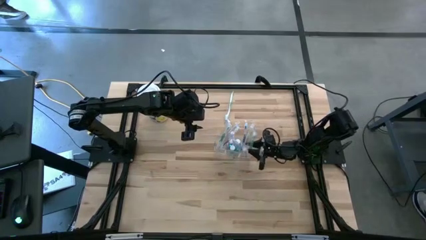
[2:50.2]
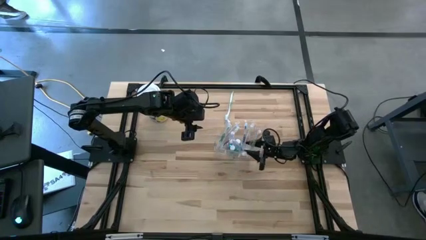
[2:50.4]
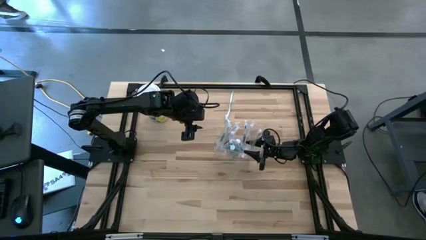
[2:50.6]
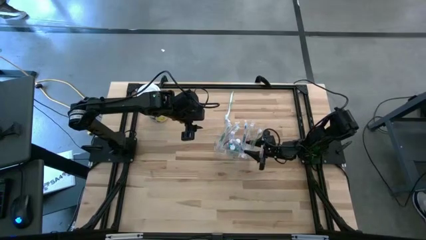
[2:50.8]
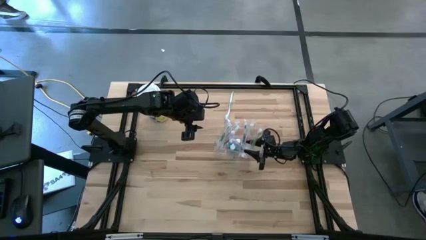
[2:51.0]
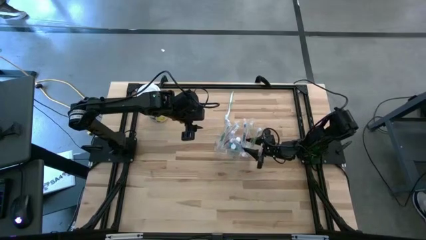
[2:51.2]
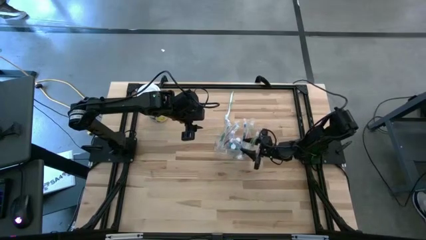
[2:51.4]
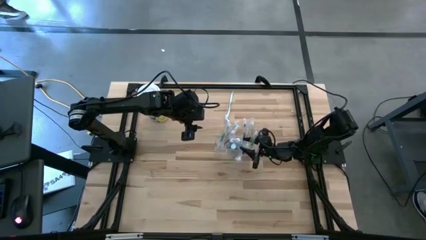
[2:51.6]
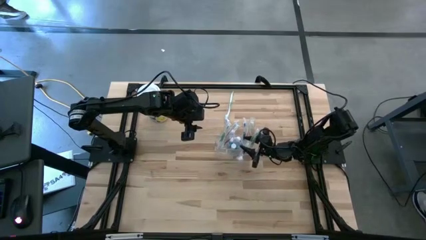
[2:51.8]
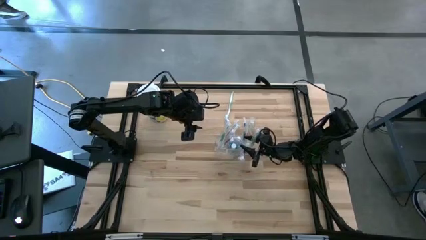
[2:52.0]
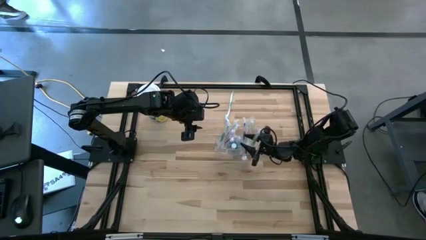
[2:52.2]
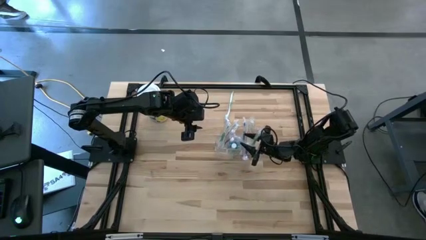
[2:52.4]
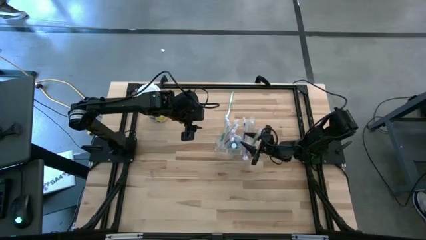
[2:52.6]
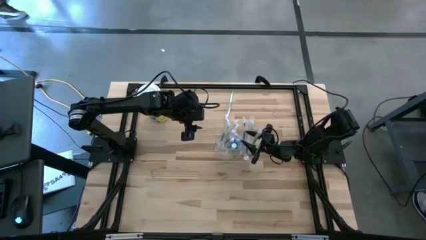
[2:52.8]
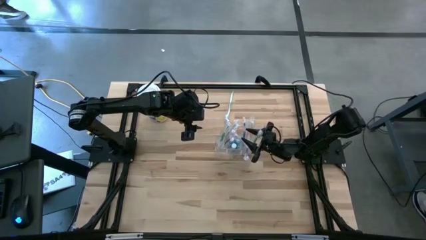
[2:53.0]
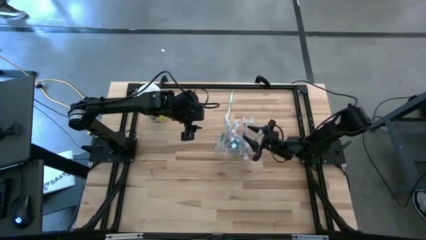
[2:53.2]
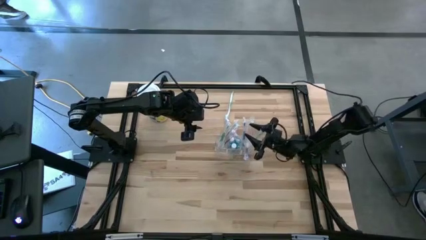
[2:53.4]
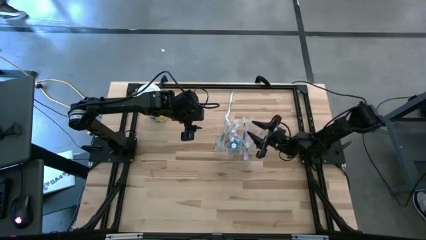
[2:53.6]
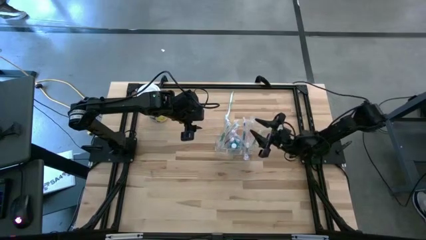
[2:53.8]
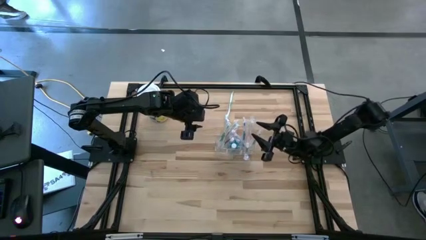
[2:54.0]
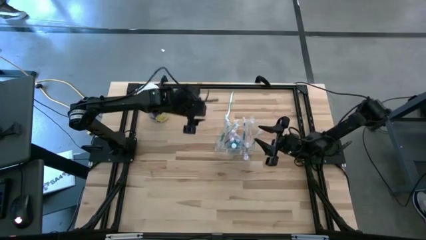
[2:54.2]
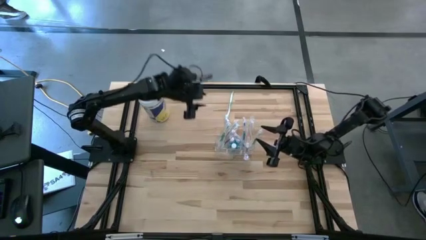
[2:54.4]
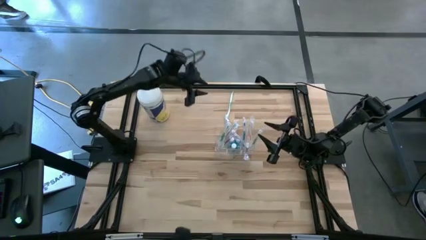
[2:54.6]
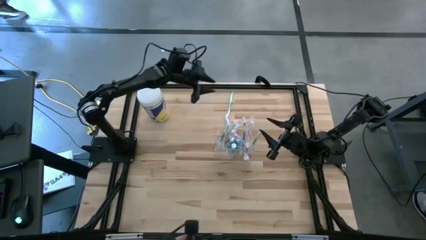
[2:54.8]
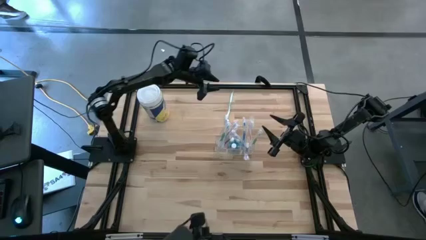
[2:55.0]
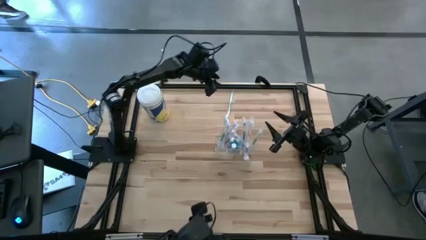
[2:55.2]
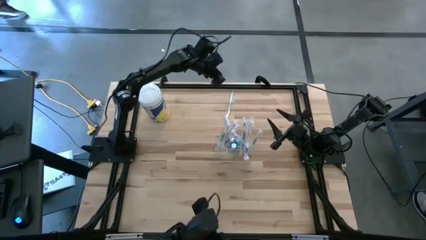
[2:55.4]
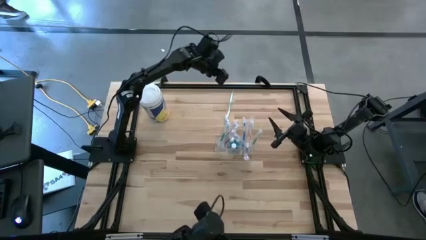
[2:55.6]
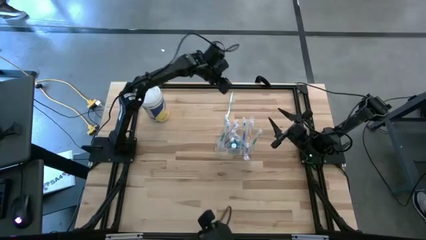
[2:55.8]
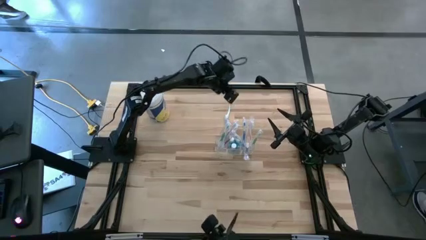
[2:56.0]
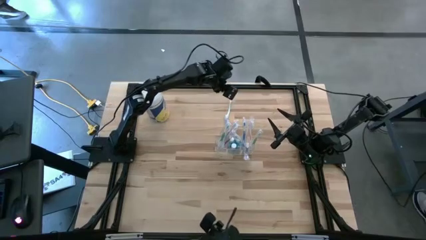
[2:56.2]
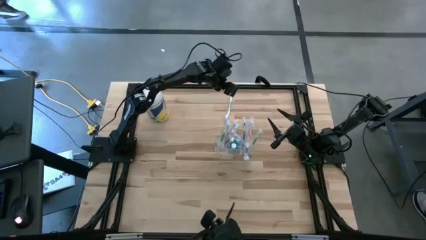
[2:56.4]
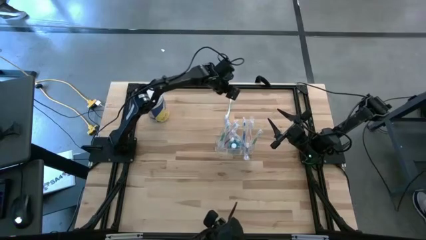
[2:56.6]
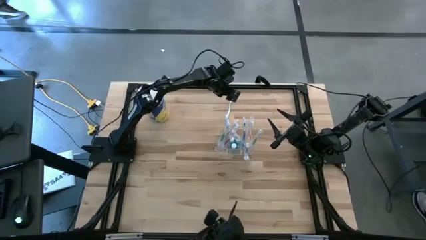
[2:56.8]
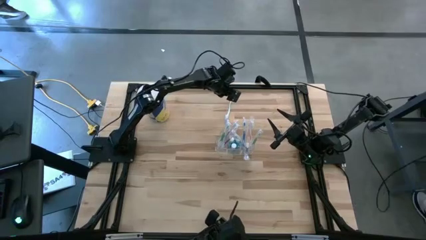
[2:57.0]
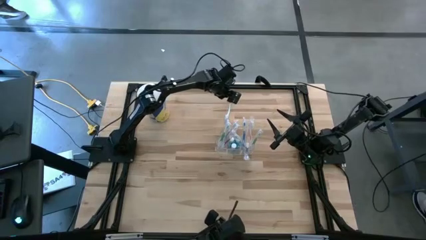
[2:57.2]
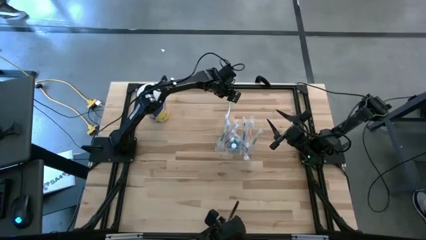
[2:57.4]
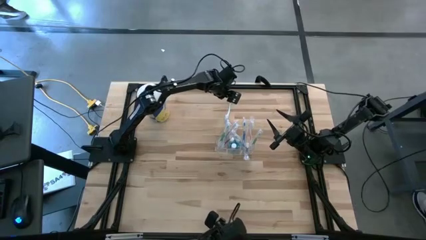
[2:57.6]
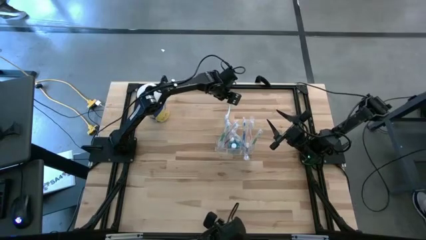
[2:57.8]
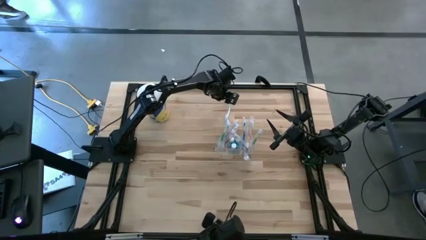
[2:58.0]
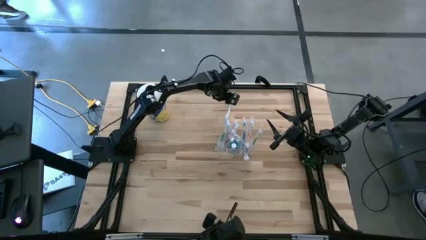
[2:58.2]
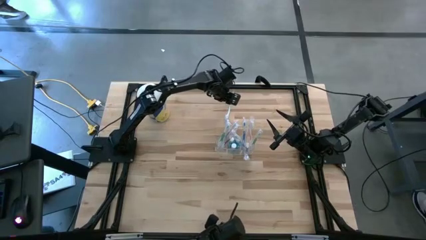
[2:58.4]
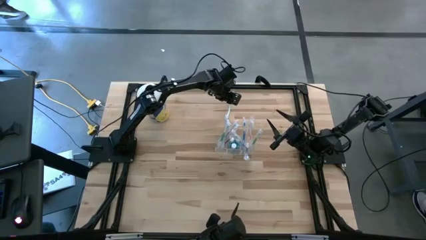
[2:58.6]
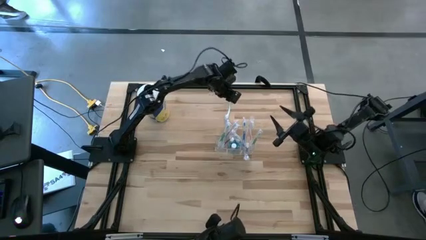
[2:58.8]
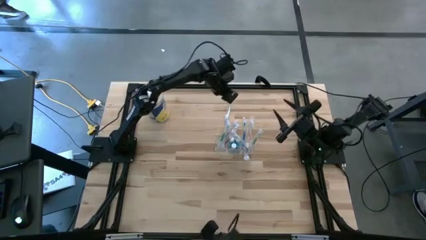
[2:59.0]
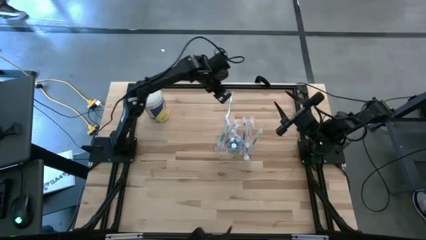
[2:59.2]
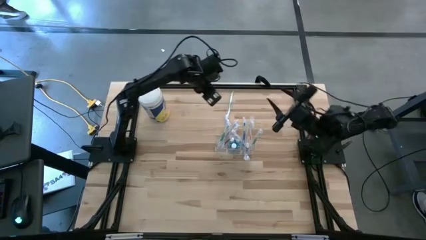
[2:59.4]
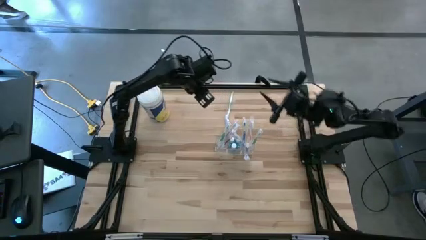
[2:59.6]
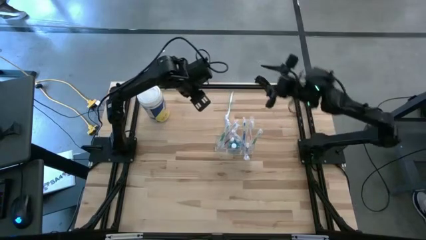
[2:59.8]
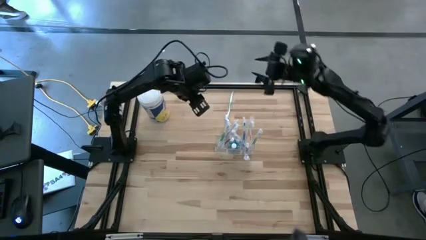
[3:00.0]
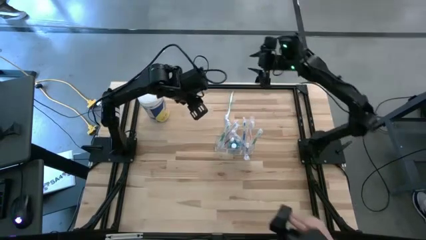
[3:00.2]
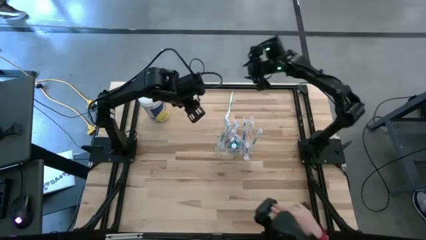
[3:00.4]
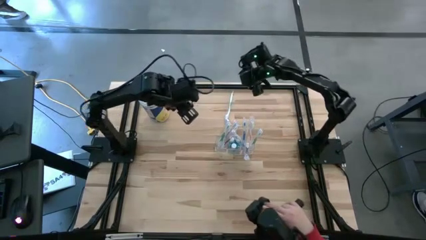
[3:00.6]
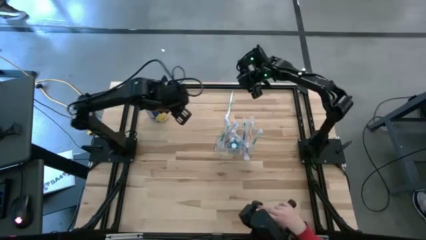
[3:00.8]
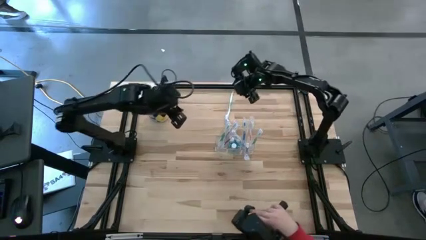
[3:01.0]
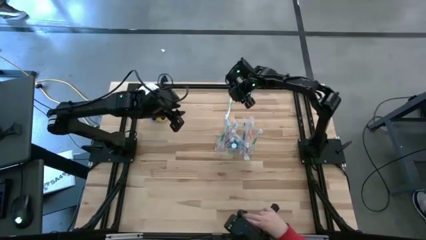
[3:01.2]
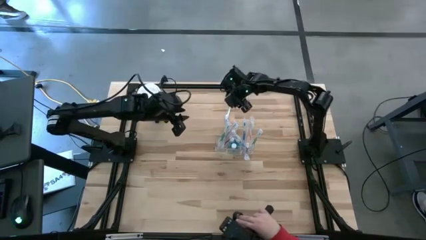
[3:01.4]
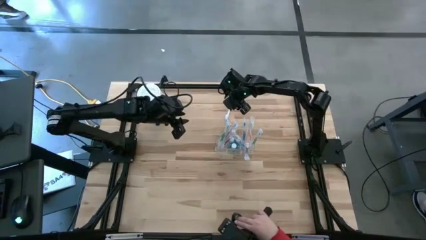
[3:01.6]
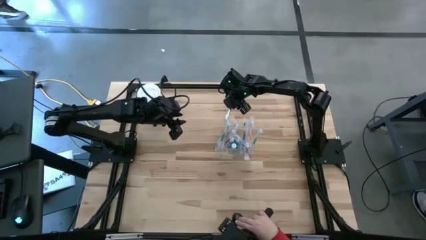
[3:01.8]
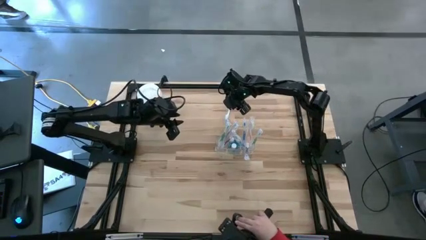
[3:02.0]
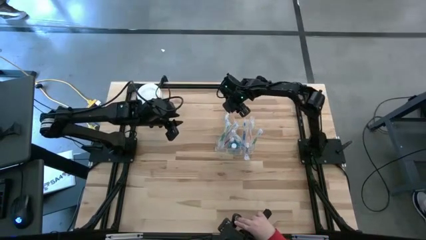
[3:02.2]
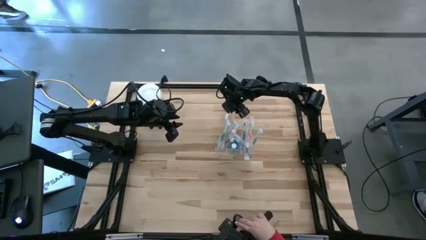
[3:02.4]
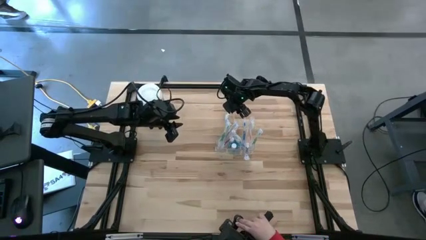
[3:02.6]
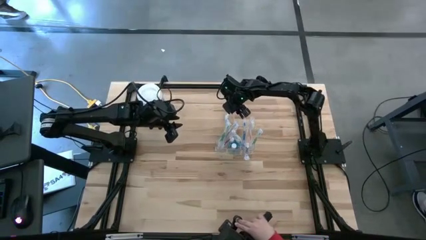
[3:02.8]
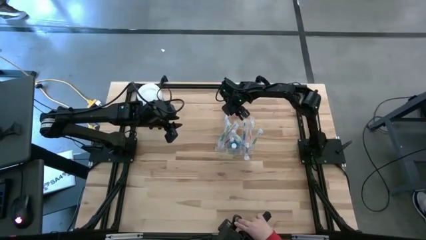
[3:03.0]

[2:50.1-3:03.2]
Task: Pick & Place toothbrushing station
Put the green toothbrush into the left section of the transparent organizer
